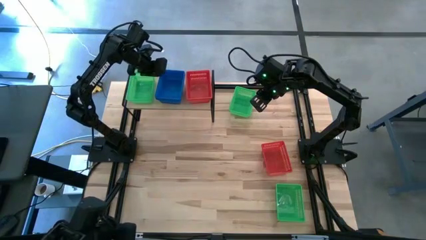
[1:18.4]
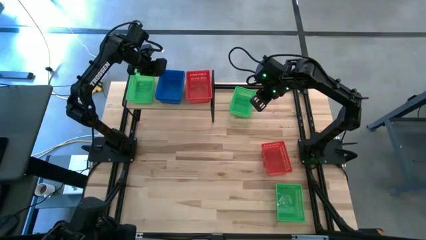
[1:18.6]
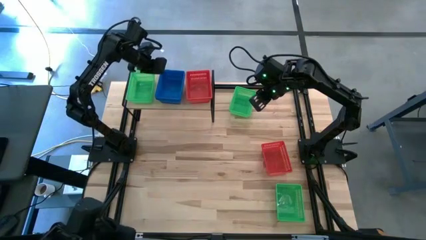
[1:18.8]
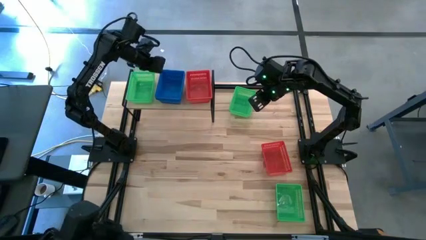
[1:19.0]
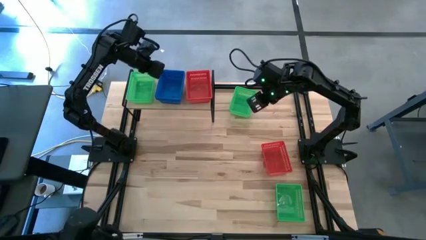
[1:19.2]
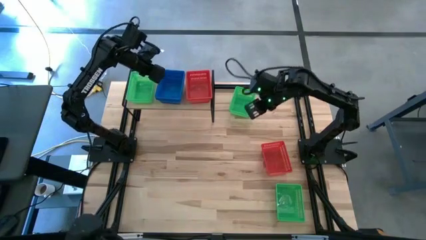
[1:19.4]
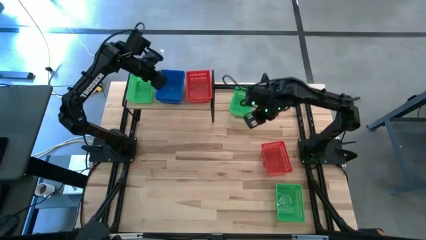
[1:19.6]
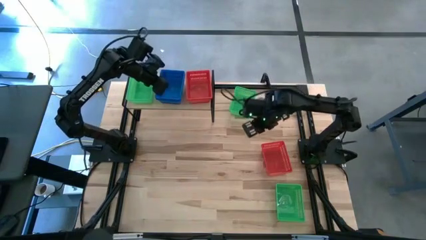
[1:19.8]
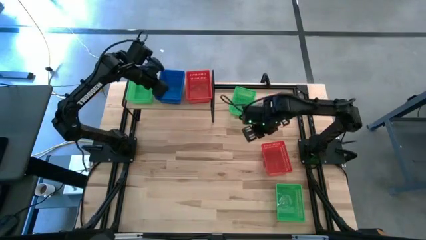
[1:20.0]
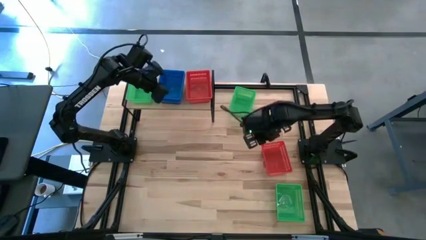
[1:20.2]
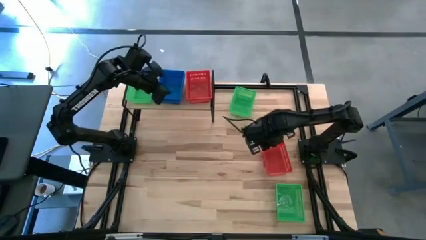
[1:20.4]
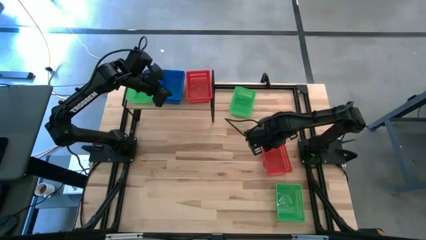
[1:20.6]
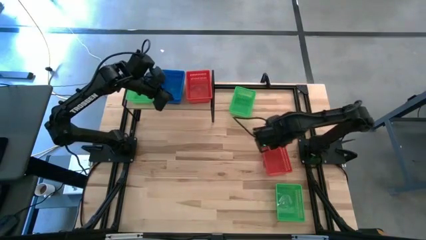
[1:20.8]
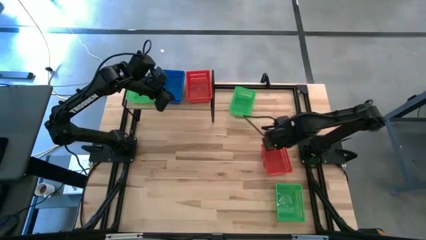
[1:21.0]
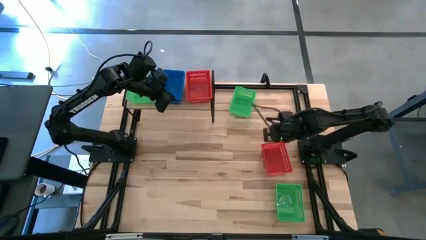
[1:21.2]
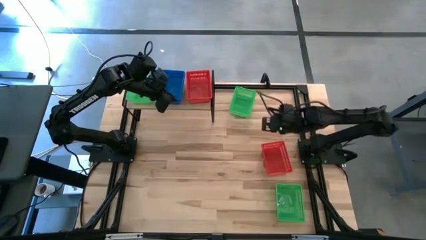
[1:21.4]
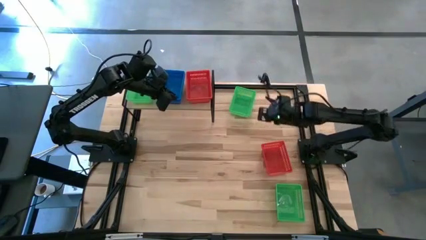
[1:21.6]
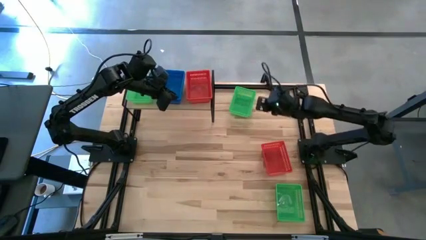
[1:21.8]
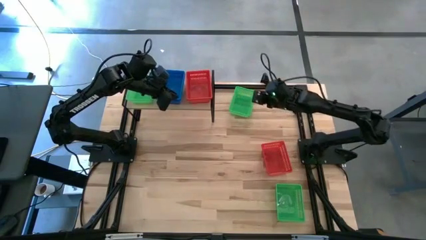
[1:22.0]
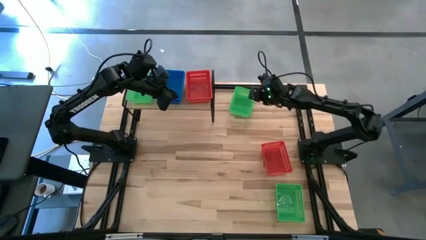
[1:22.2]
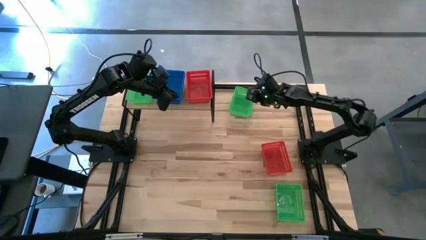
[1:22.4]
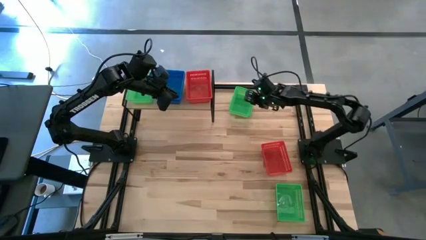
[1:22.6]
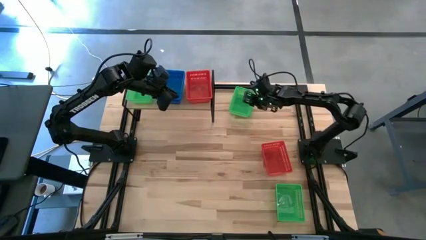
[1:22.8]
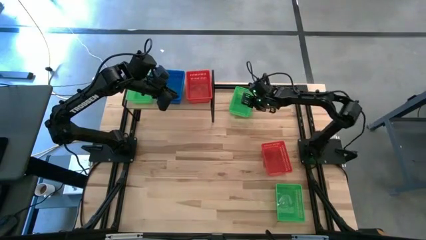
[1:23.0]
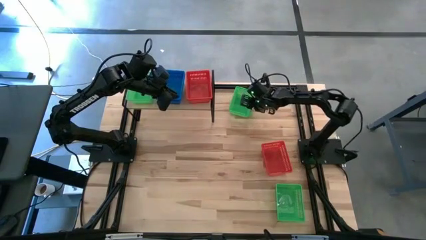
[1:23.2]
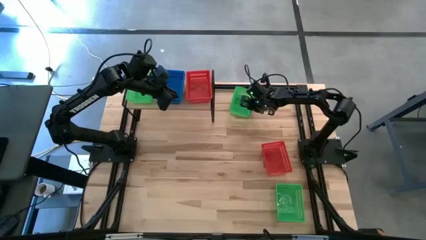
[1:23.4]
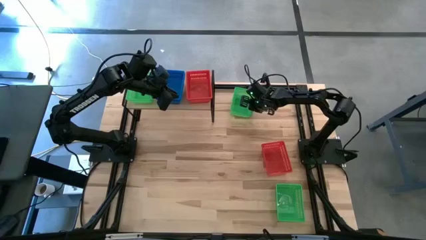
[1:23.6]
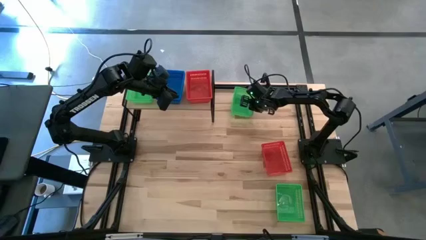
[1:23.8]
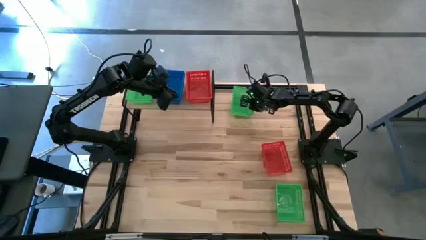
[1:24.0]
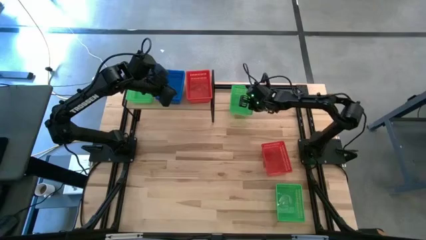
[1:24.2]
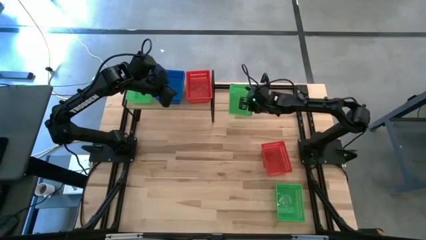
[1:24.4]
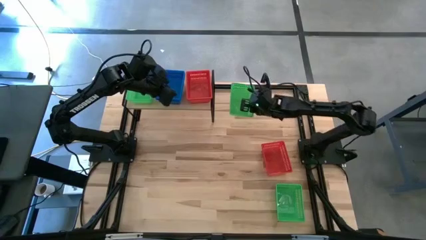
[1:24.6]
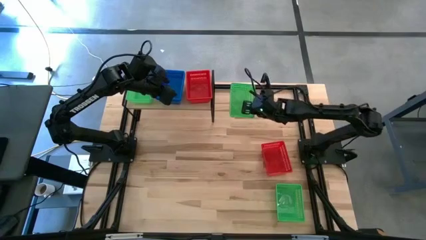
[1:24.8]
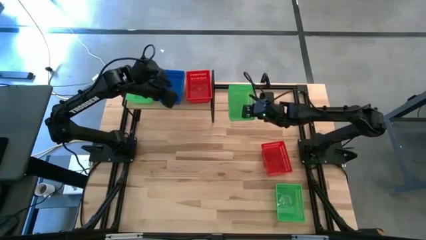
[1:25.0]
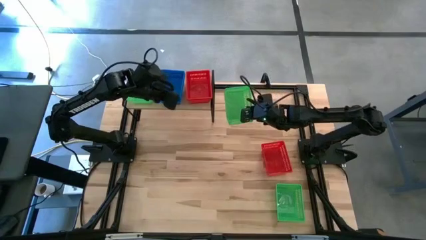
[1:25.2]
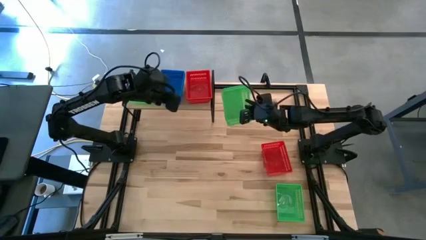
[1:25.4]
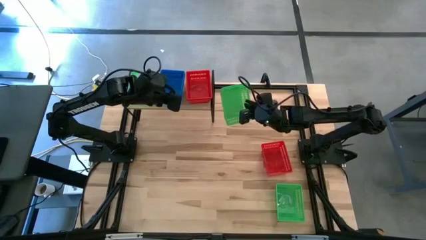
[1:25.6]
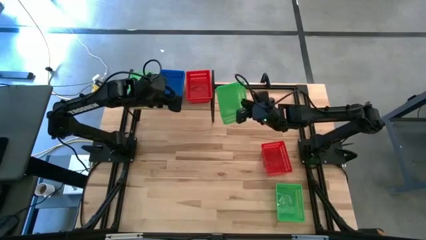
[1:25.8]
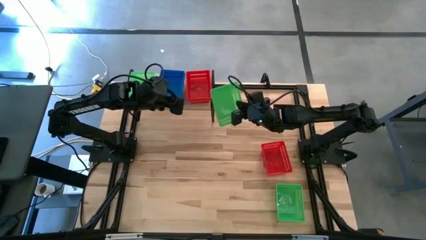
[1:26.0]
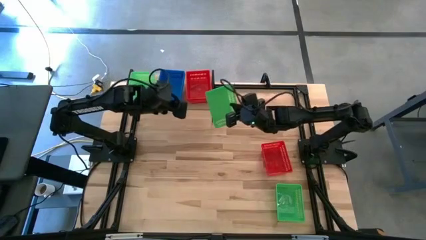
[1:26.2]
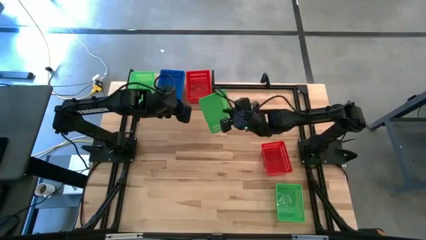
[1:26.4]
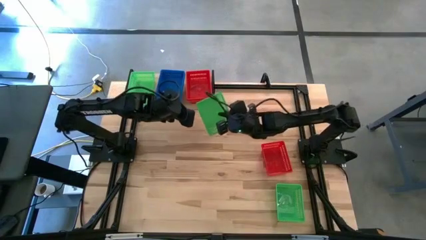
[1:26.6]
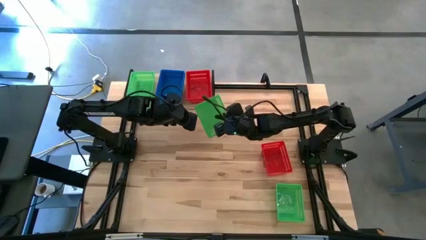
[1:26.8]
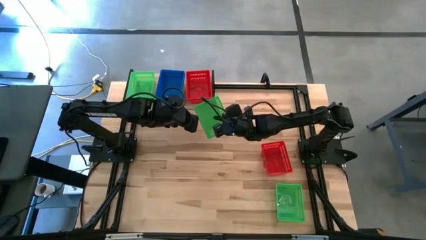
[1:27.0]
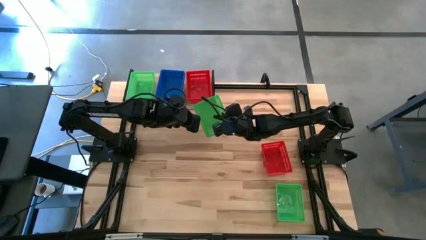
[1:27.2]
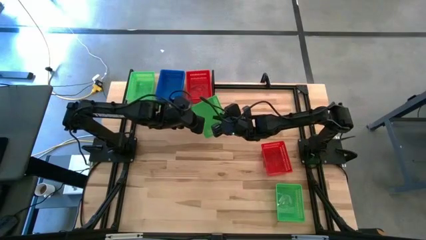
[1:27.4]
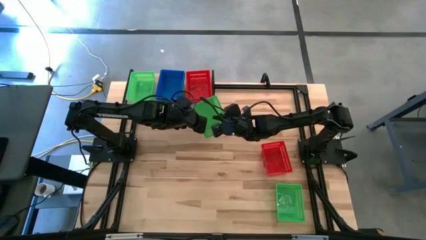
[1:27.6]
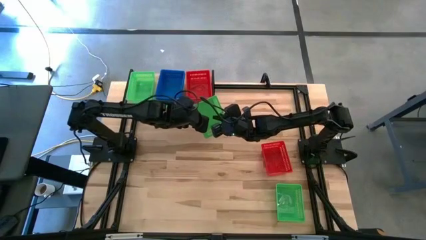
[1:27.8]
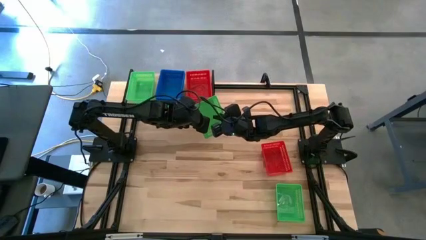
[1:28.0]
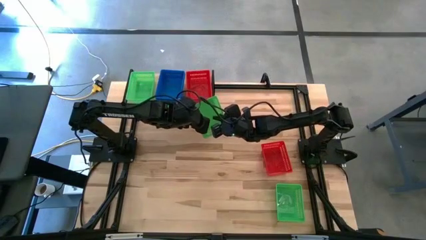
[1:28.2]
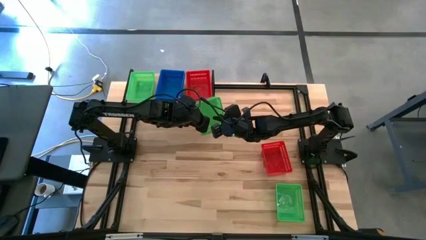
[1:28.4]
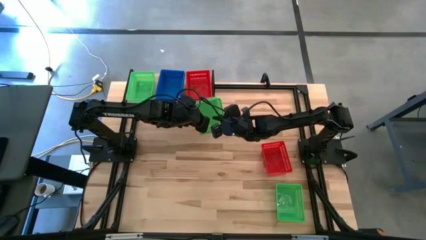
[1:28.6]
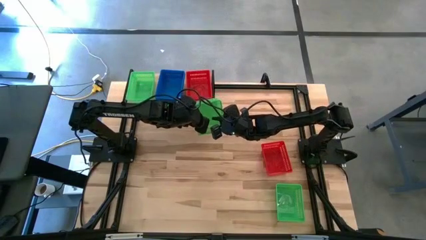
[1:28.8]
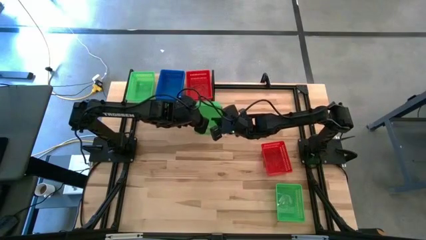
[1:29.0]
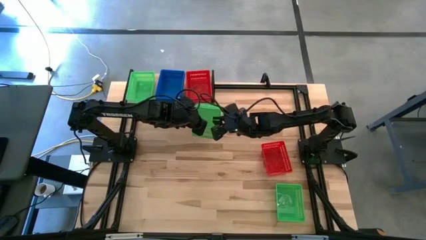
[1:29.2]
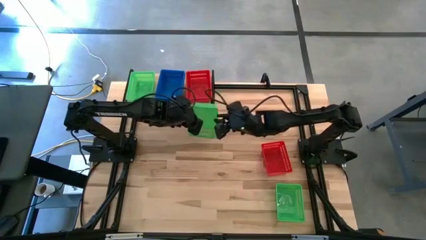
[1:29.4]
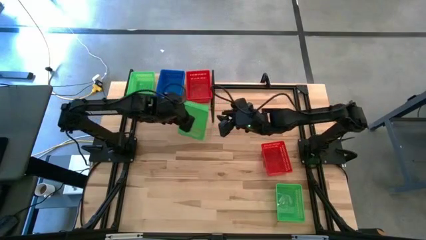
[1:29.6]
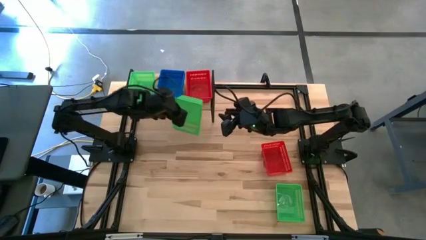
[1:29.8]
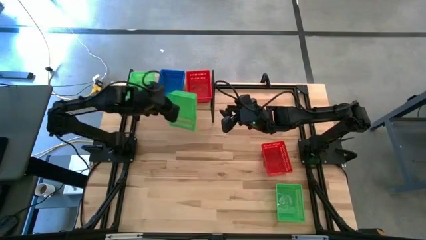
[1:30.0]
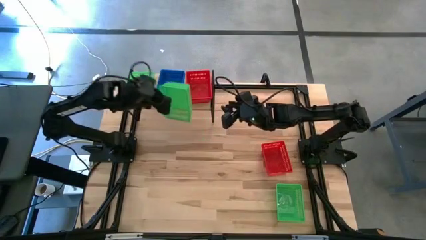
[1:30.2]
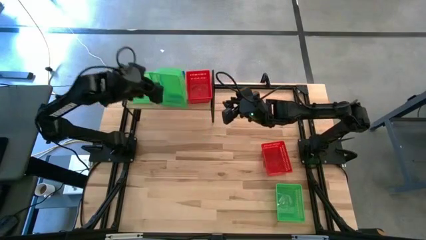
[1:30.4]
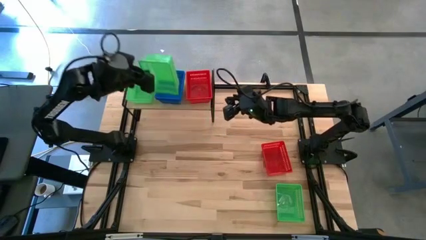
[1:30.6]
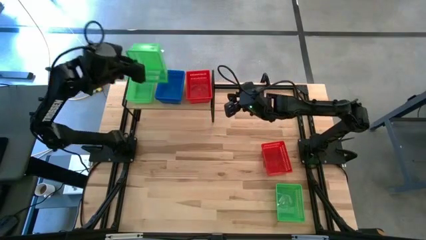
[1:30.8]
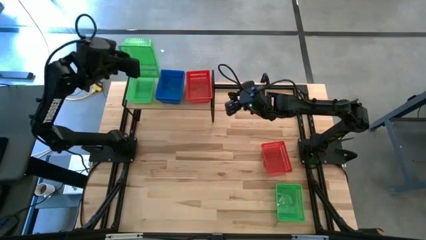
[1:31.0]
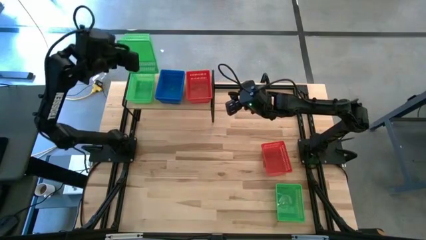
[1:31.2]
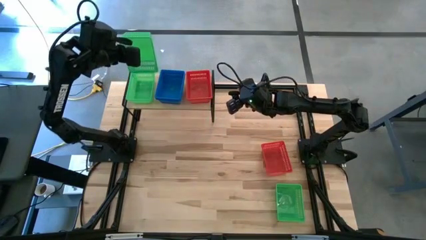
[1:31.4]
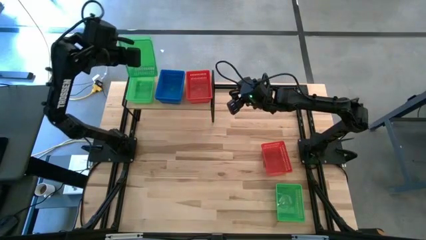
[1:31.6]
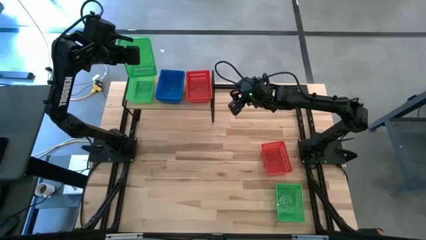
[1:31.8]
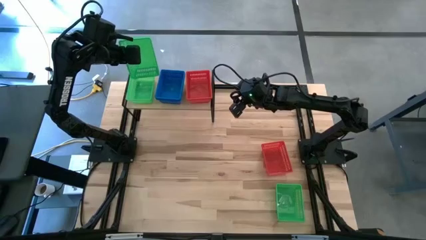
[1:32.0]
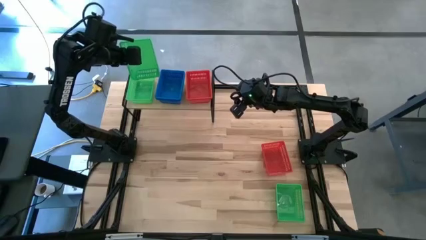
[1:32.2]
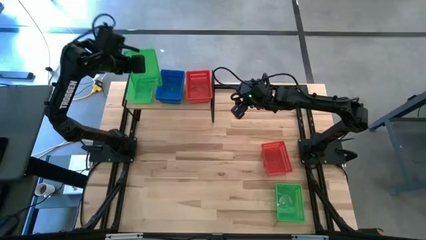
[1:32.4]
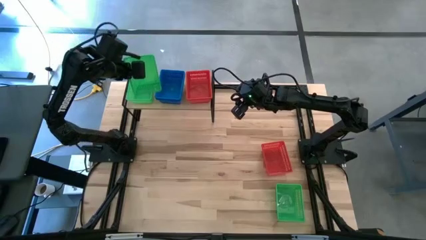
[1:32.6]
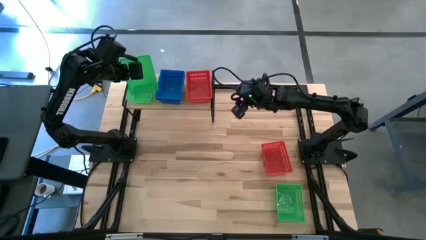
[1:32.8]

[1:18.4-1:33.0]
Task: Stack baskets on shelf by color
Stack the top green bin on top of the green bin on the shelf

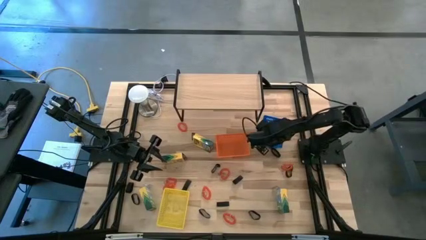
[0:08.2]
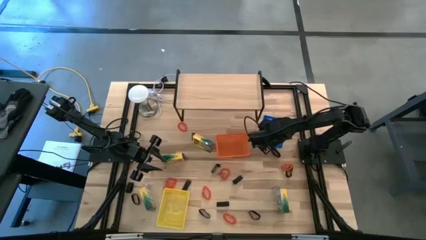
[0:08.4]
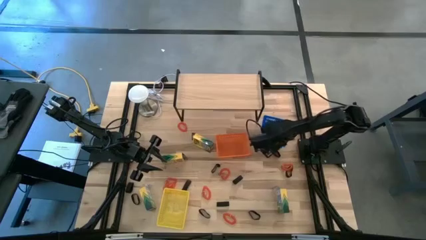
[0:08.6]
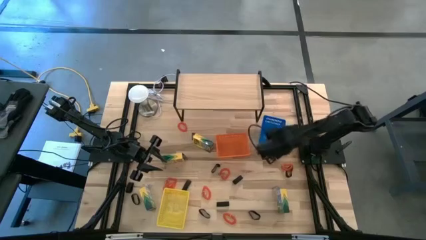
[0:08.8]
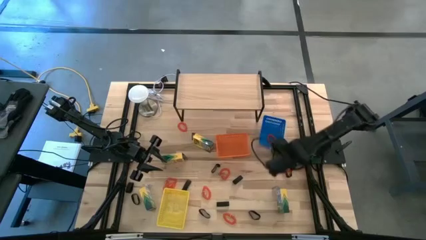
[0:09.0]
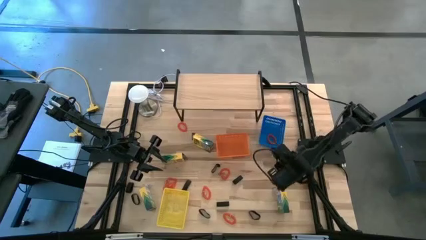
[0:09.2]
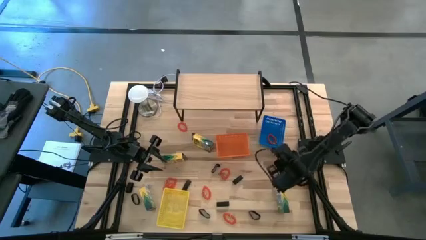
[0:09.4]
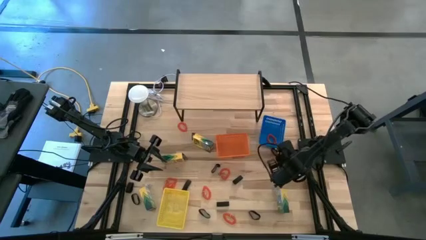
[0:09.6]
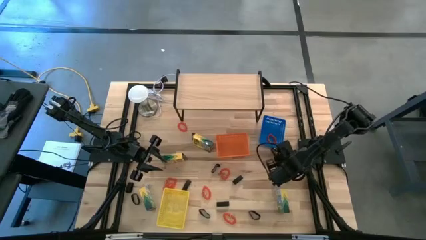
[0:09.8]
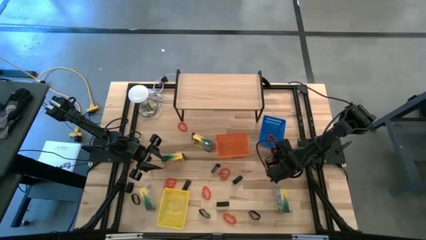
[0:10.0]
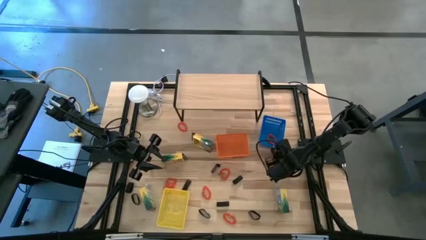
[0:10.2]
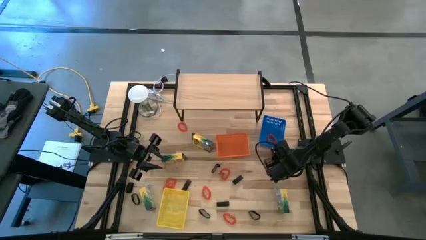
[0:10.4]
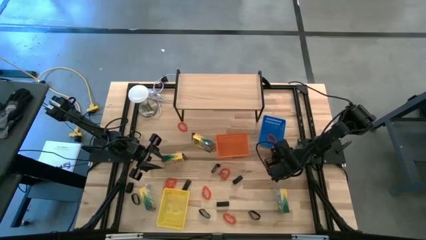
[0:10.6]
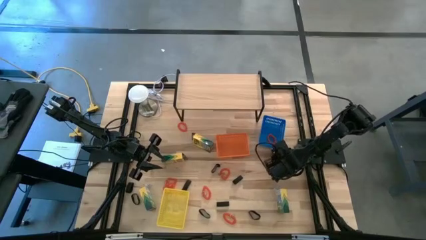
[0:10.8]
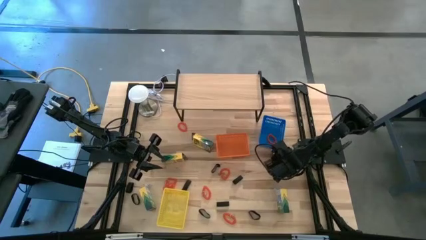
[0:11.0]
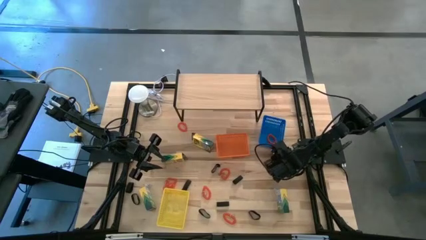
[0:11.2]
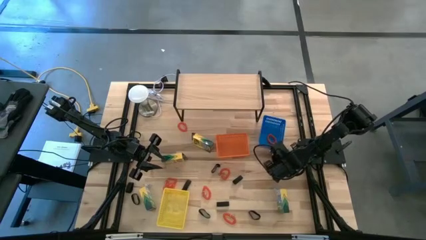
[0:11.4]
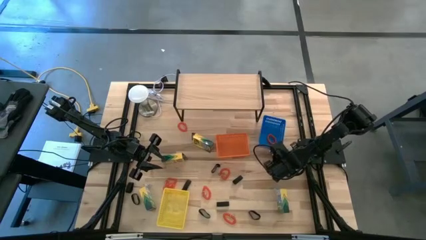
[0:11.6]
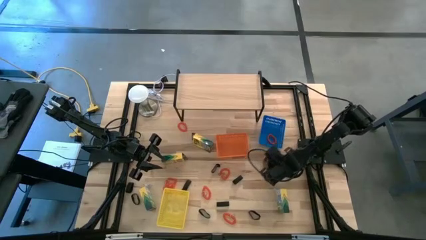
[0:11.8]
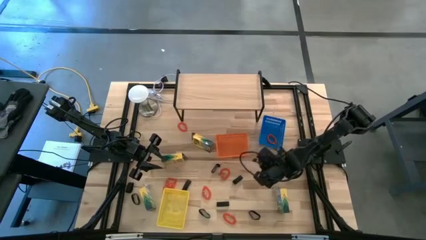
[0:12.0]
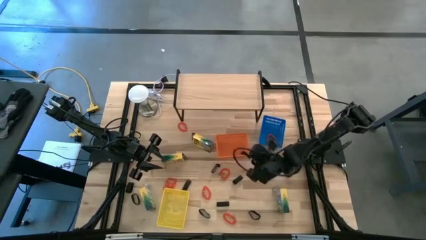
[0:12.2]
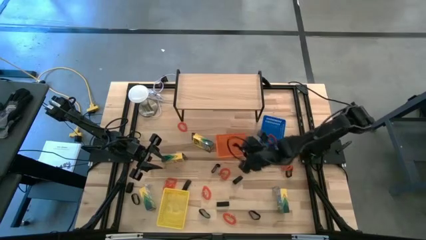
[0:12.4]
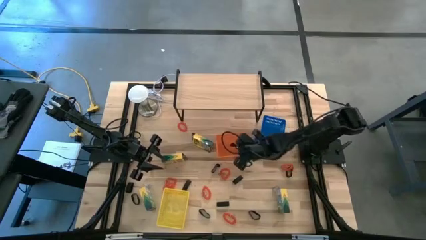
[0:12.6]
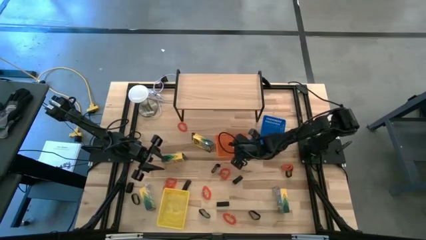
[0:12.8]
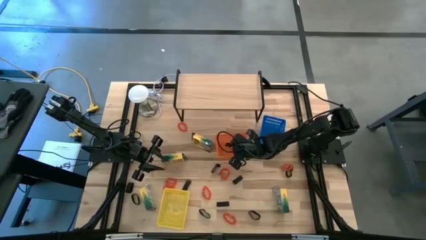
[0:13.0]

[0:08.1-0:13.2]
Task: Pick & Place Office Desk Supplies
Put the rubberband into the orange bin
